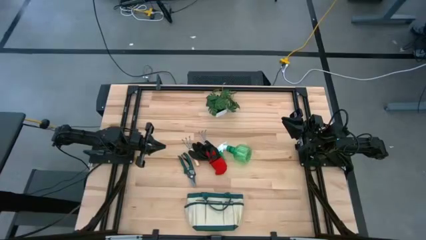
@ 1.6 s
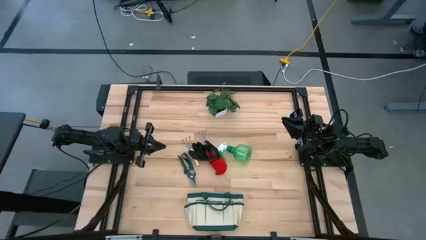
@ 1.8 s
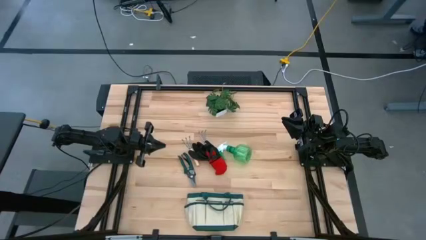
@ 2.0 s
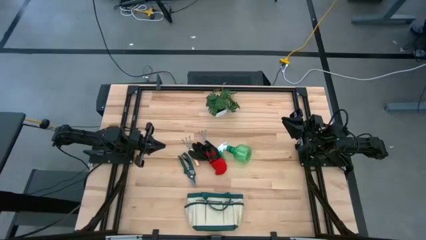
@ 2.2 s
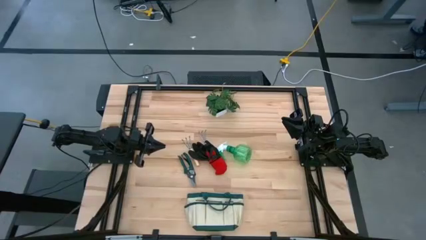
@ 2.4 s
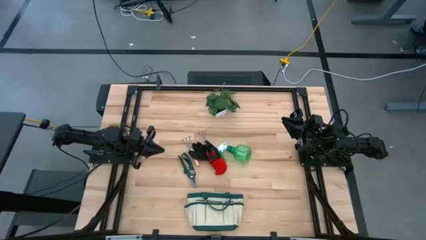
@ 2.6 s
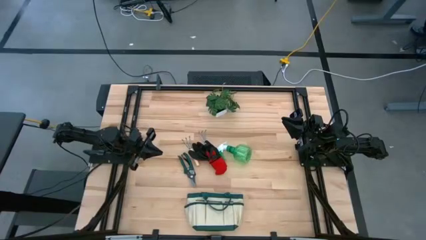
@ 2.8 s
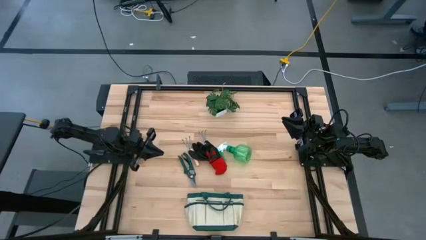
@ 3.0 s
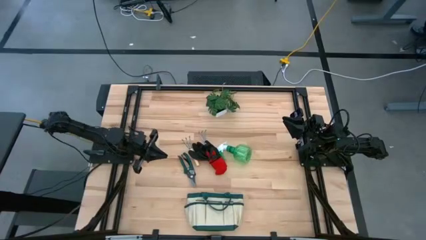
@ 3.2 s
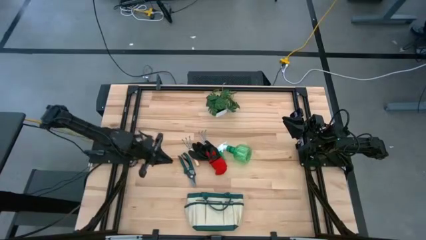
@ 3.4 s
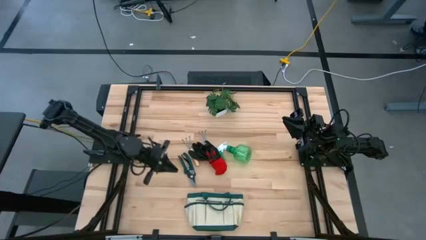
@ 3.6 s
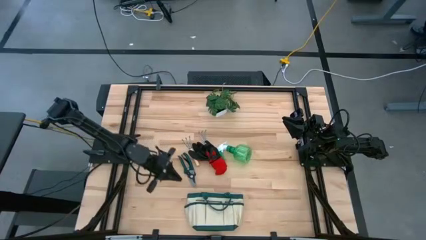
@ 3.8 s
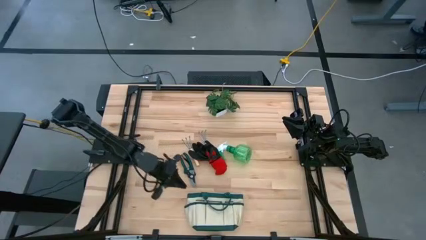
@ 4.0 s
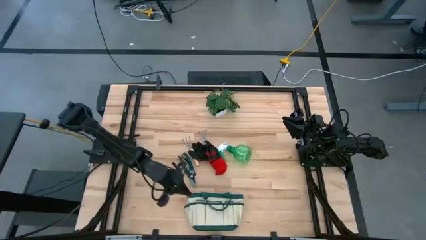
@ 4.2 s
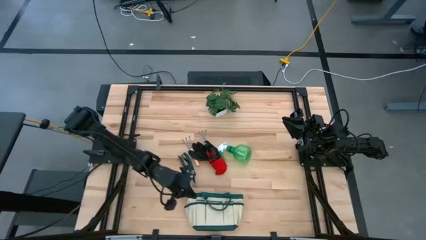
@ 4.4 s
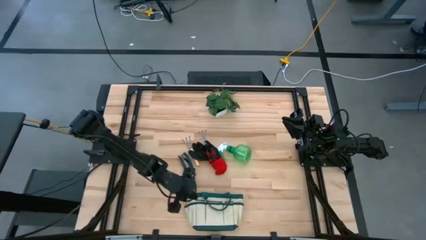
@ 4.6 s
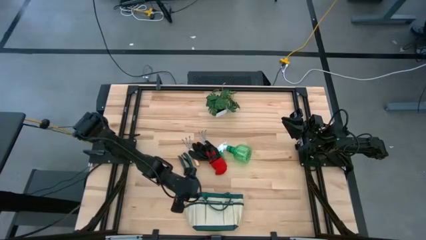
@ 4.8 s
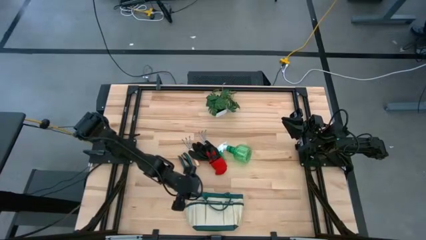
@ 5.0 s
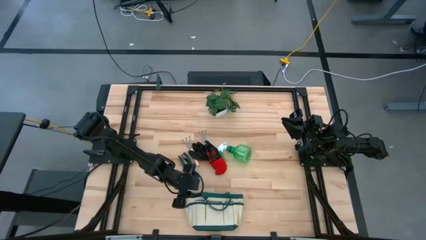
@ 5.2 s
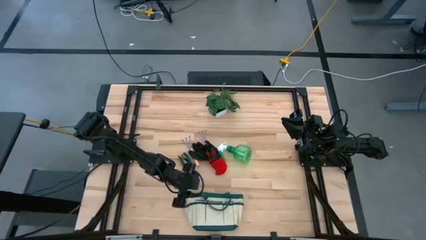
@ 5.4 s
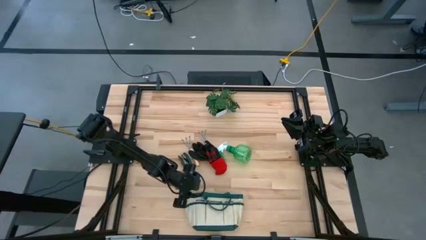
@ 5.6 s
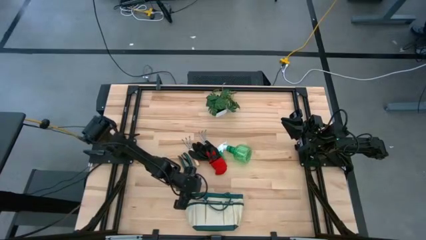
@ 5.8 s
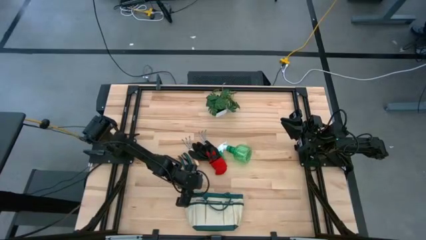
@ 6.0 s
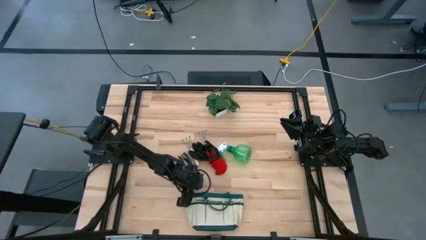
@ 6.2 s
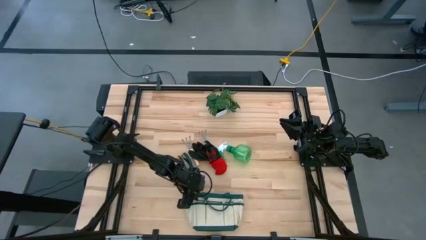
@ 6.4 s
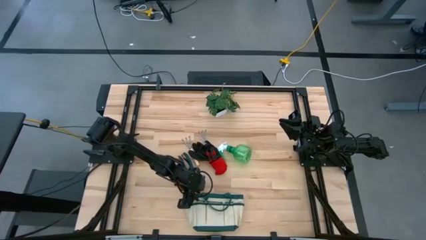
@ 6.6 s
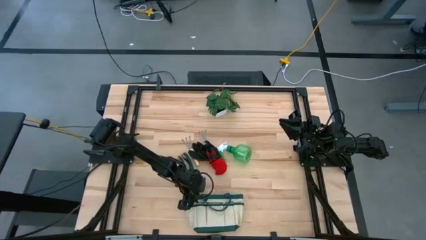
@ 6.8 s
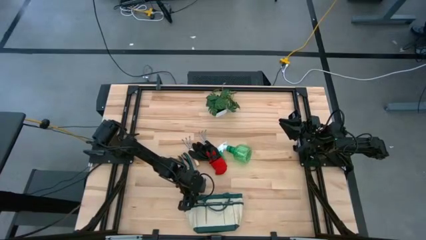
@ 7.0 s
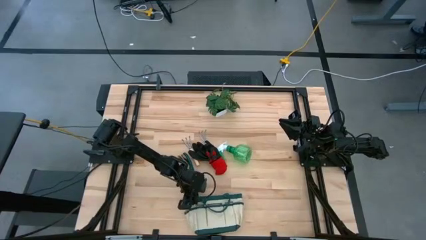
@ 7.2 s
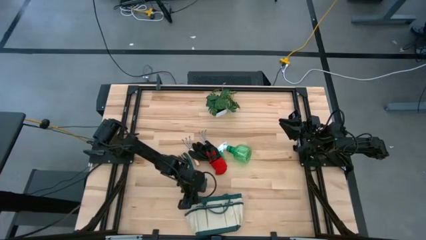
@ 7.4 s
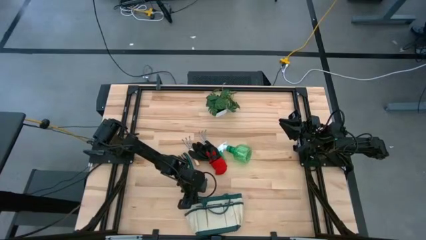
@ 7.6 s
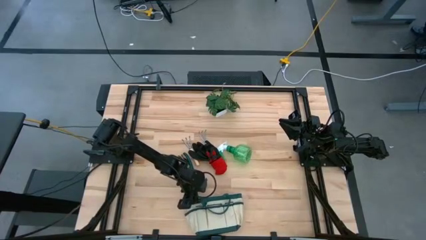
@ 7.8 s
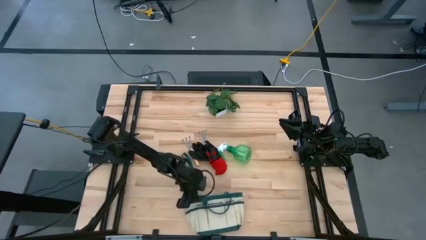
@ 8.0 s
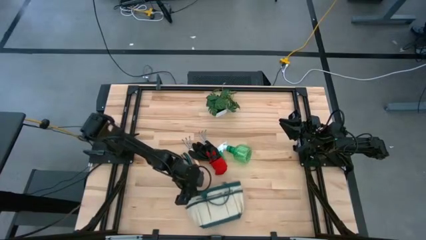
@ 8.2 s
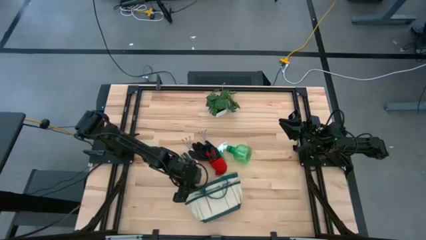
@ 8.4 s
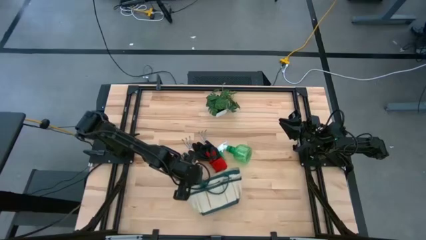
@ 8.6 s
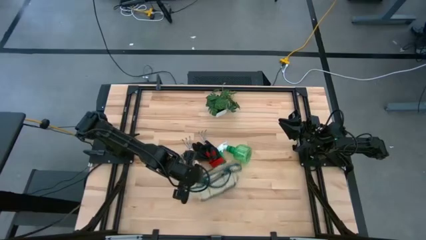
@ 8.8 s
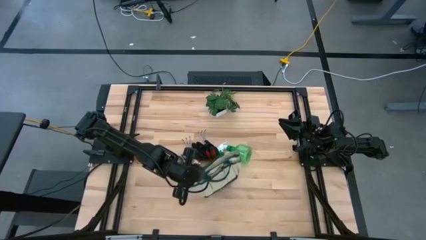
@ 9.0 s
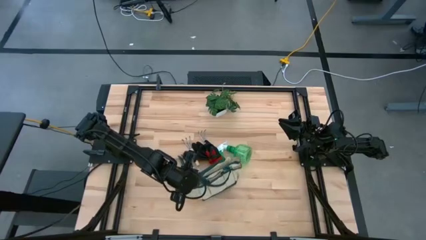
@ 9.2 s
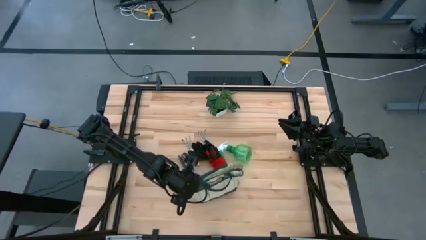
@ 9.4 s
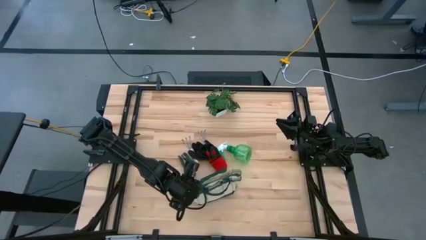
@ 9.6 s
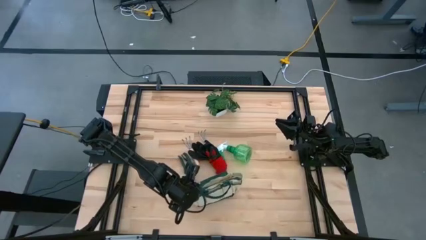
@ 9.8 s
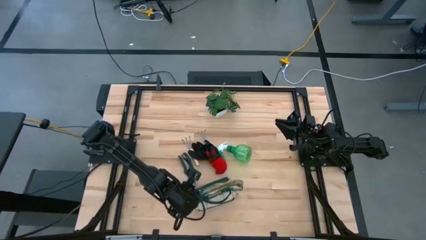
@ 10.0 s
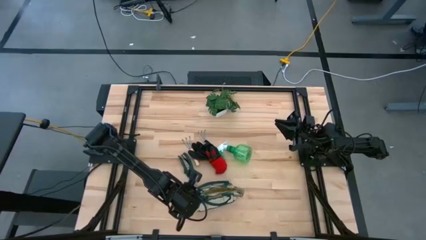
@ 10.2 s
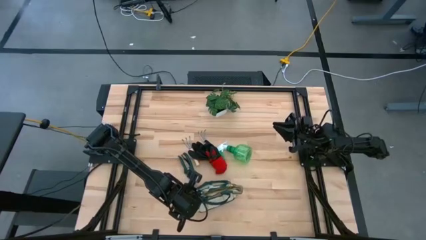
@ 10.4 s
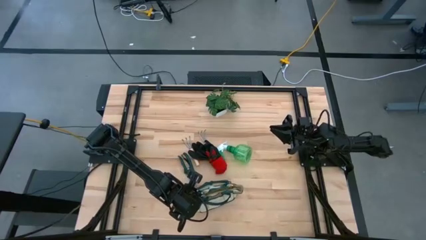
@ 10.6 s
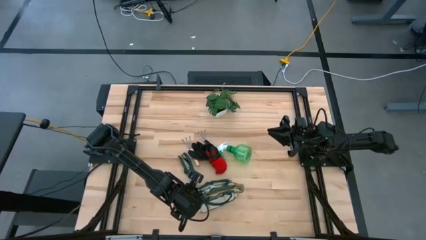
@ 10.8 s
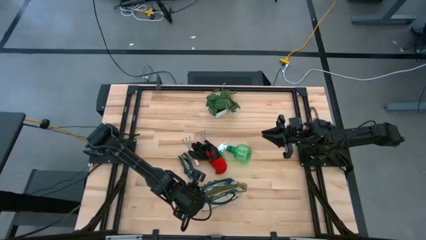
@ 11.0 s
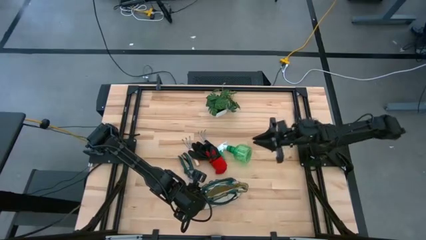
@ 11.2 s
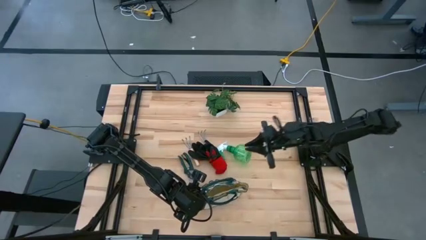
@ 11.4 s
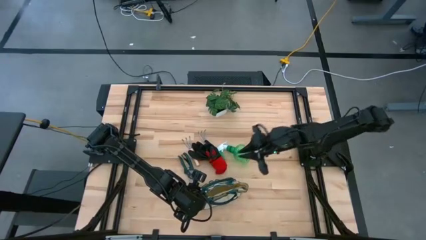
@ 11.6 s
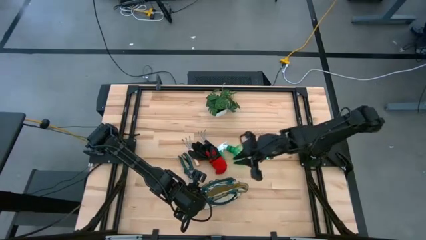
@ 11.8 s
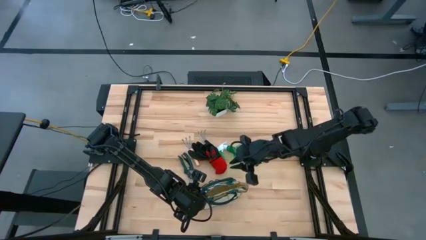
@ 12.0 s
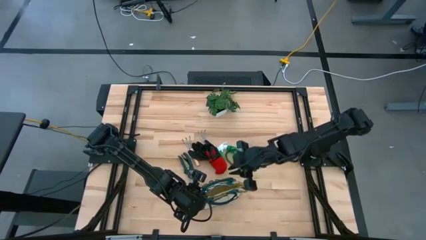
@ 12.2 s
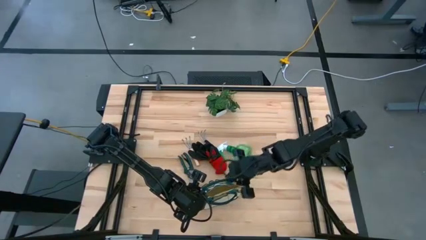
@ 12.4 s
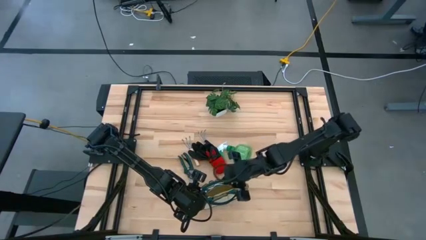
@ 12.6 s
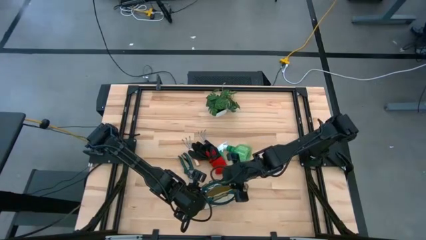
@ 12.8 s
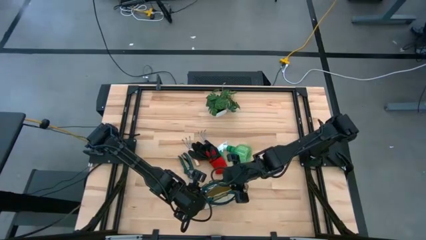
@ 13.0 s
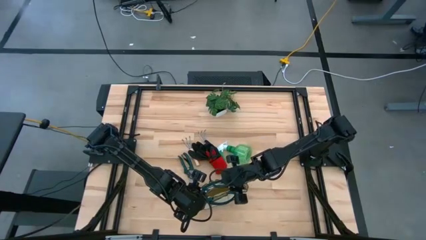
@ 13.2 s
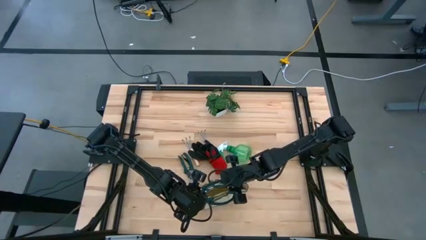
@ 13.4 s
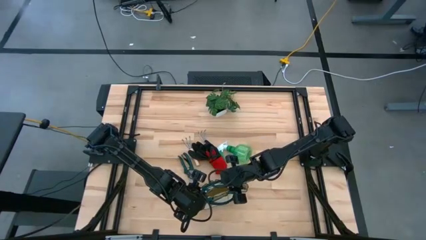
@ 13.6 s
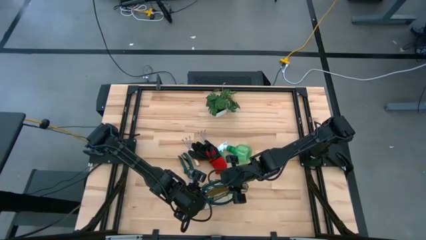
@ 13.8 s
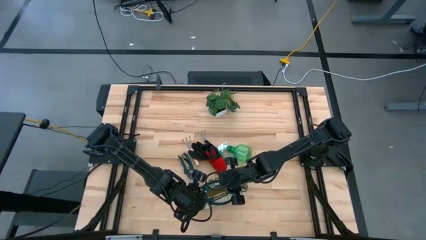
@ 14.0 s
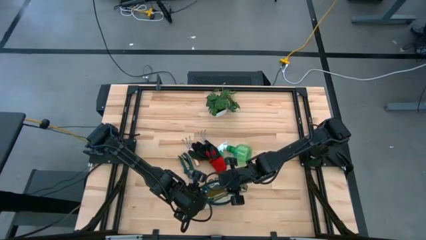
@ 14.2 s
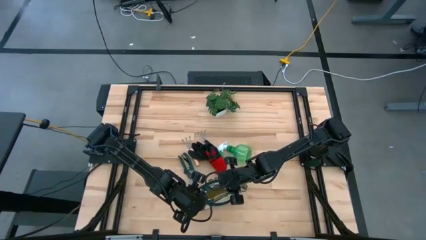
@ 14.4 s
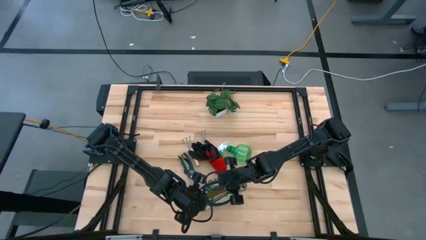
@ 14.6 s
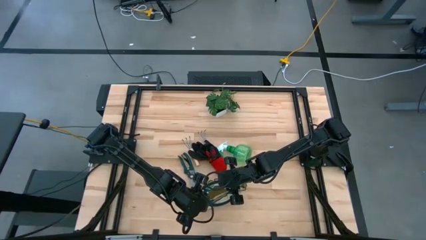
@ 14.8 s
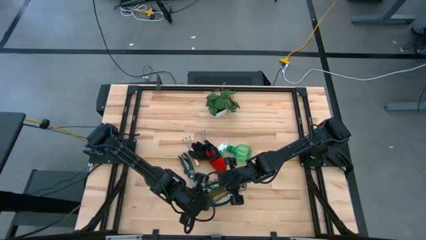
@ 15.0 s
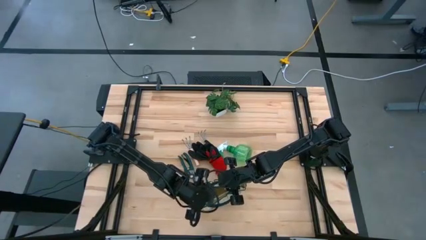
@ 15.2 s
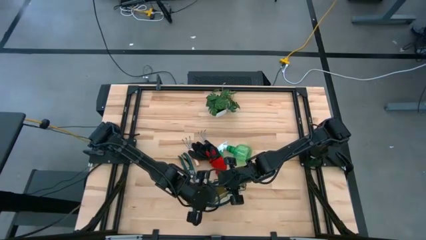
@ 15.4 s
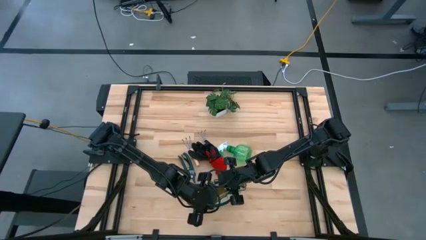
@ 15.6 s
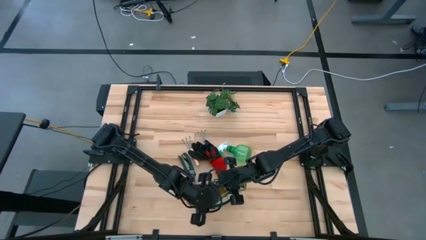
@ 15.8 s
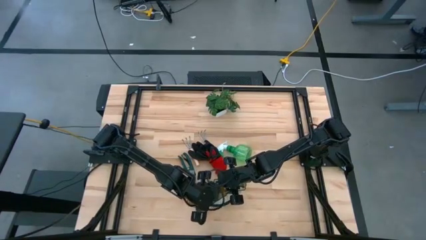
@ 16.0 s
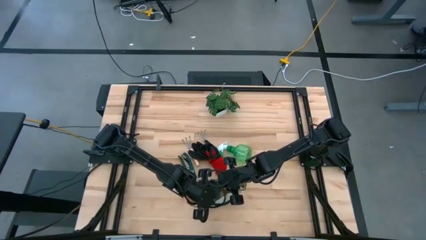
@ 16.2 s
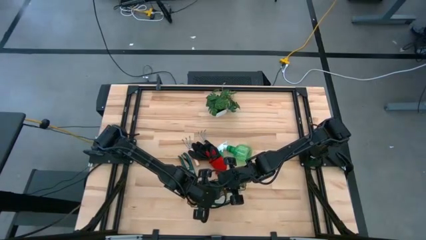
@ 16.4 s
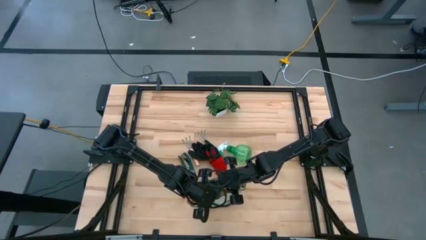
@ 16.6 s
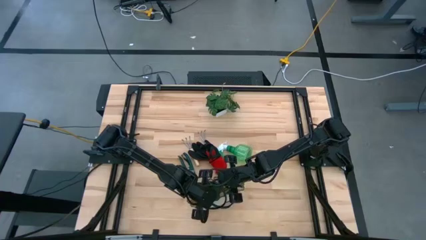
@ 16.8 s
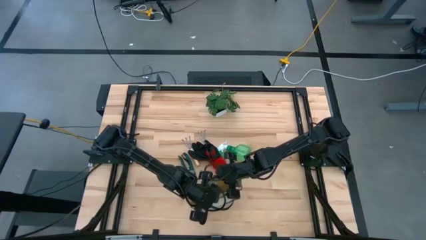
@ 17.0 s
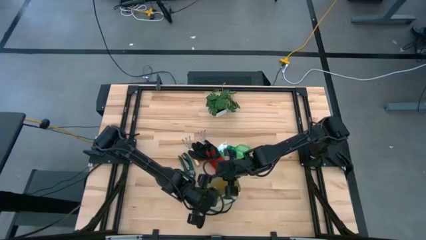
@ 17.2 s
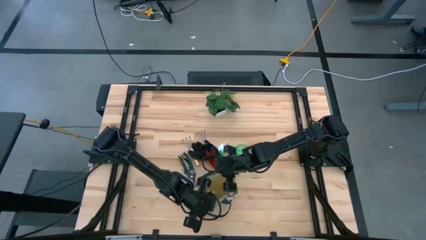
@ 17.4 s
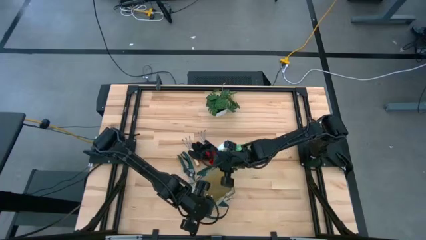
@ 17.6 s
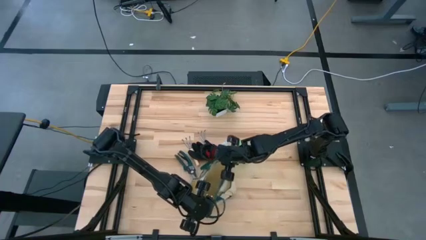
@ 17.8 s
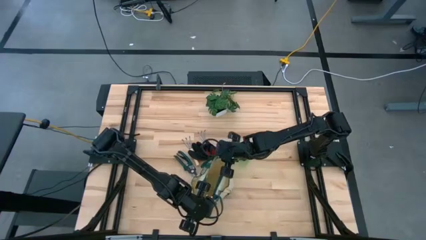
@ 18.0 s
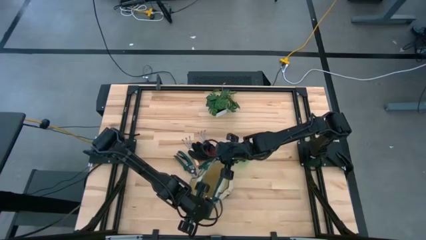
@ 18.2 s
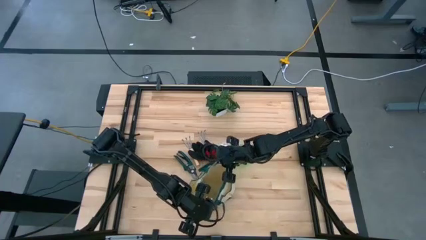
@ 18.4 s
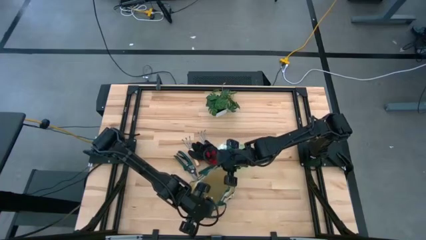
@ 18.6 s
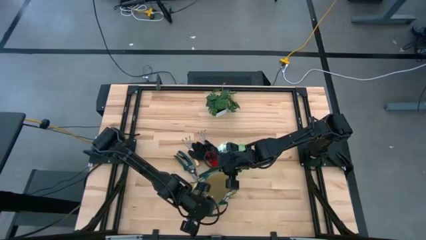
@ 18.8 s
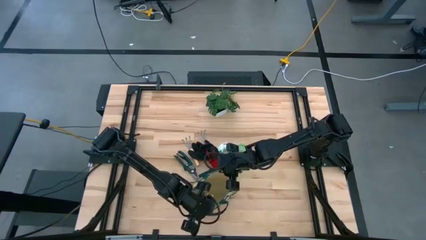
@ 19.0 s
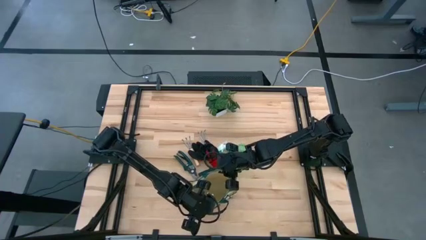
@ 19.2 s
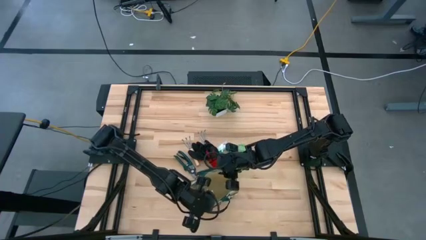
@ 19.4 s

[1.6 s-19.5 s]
Task: Pick & Place Garden tools in Gardening bag
Prepare the gray gardening bag
